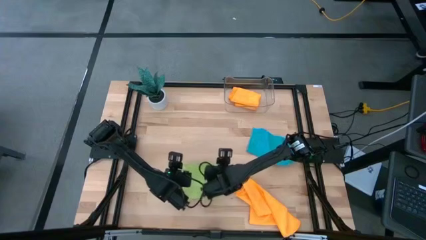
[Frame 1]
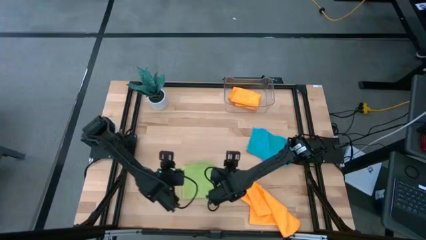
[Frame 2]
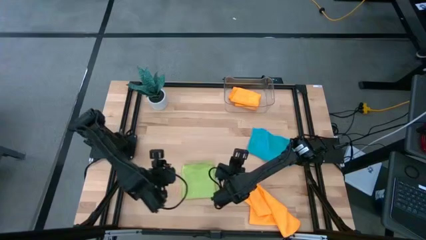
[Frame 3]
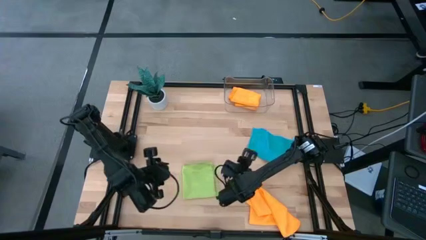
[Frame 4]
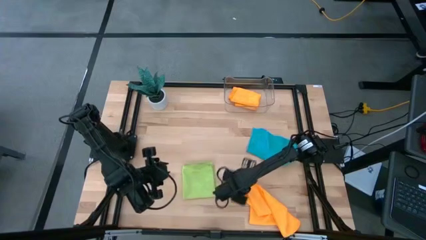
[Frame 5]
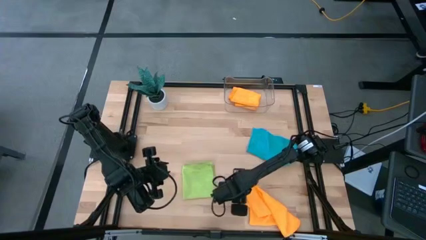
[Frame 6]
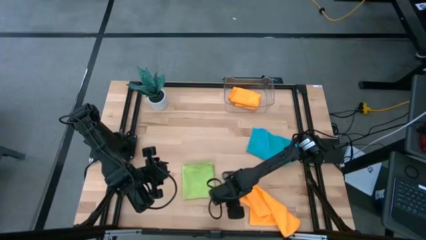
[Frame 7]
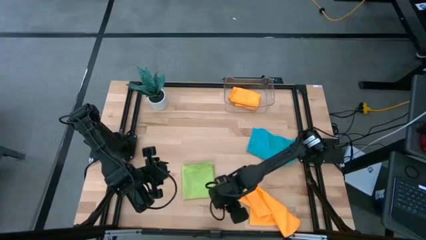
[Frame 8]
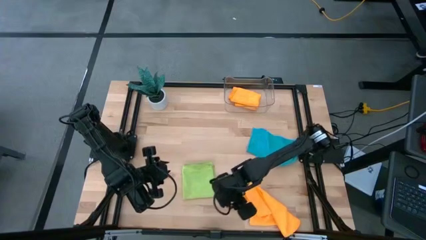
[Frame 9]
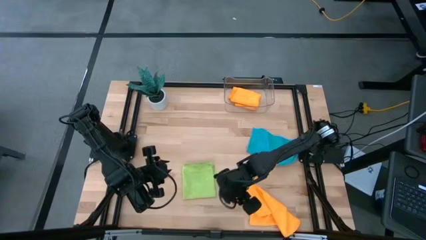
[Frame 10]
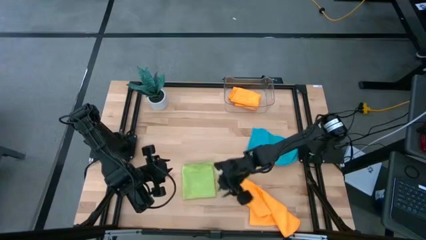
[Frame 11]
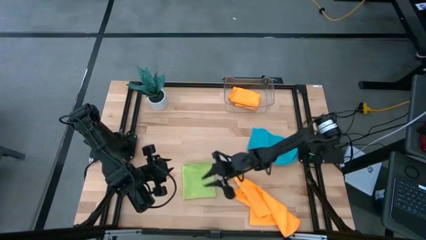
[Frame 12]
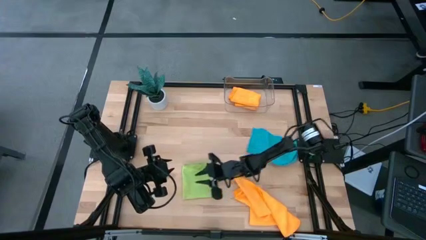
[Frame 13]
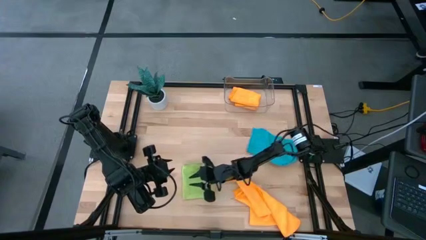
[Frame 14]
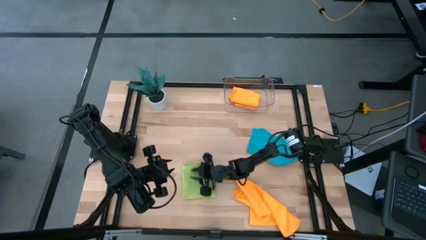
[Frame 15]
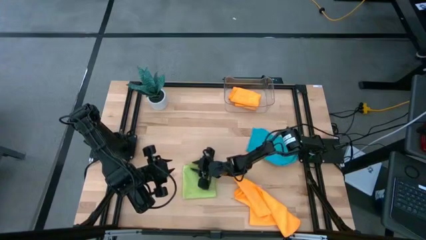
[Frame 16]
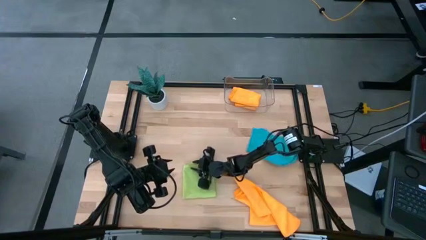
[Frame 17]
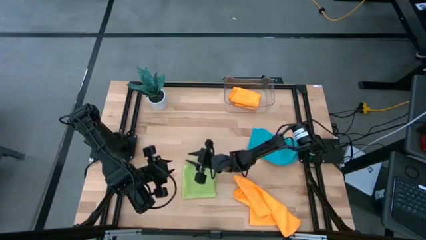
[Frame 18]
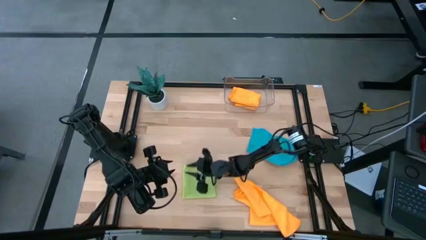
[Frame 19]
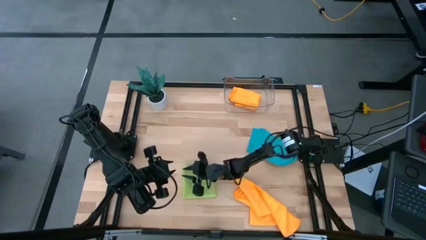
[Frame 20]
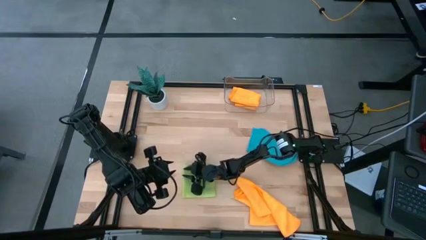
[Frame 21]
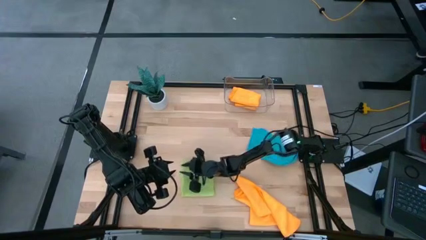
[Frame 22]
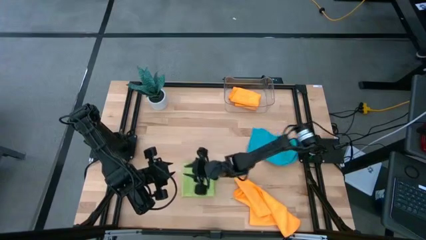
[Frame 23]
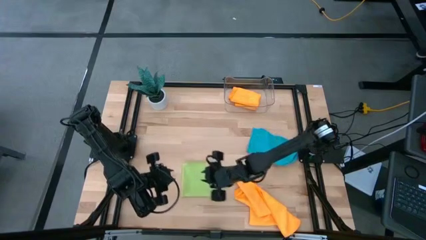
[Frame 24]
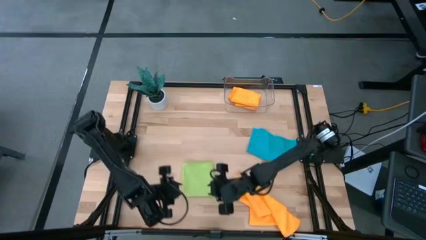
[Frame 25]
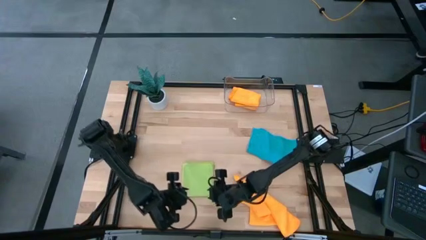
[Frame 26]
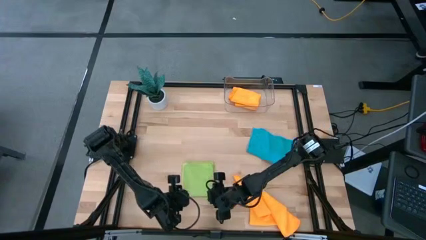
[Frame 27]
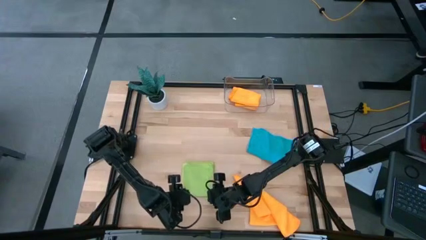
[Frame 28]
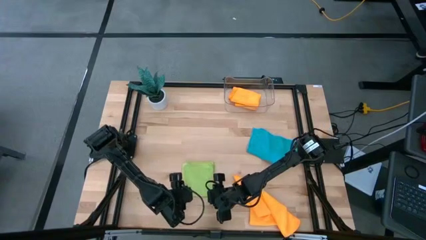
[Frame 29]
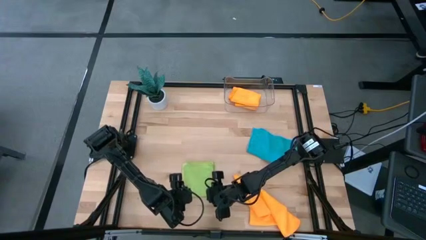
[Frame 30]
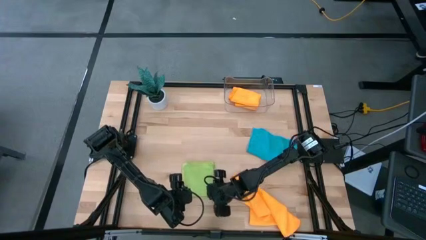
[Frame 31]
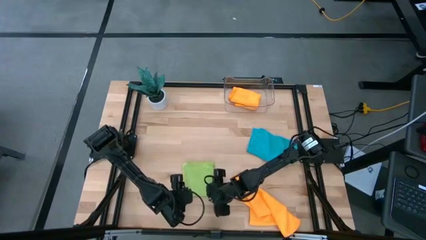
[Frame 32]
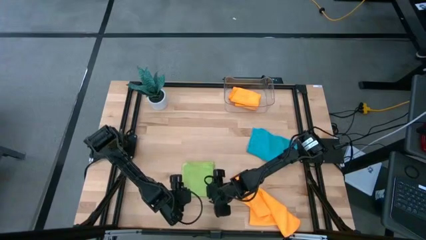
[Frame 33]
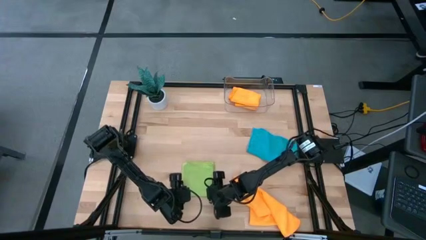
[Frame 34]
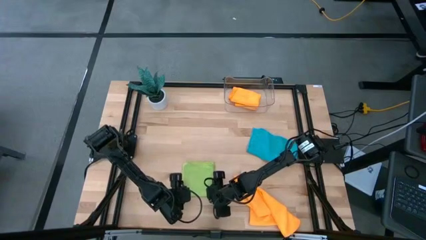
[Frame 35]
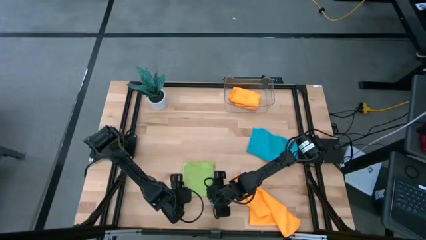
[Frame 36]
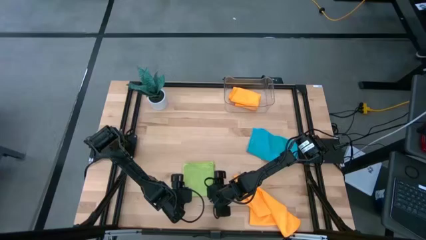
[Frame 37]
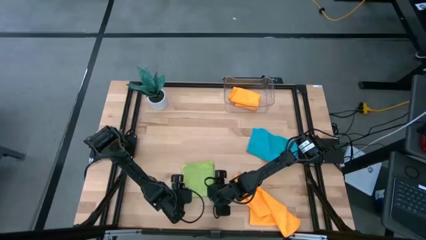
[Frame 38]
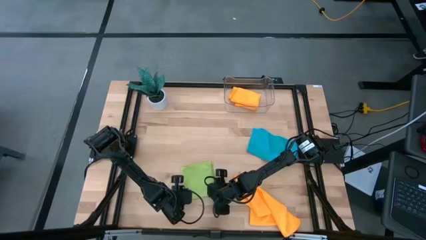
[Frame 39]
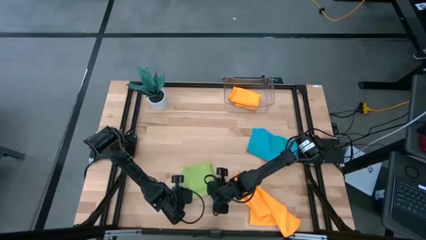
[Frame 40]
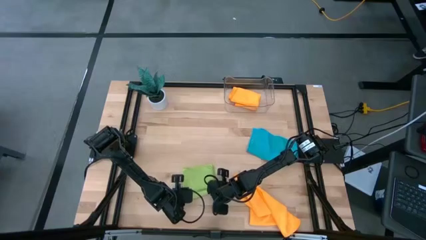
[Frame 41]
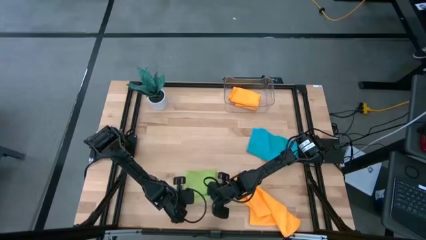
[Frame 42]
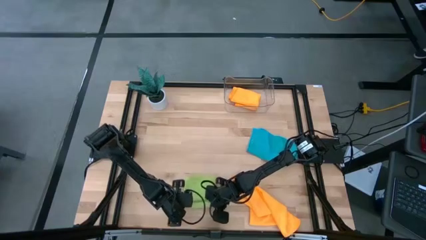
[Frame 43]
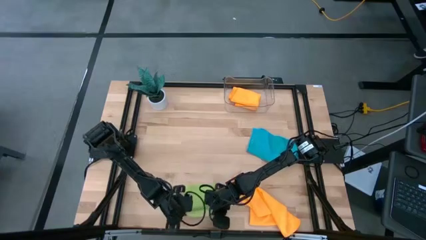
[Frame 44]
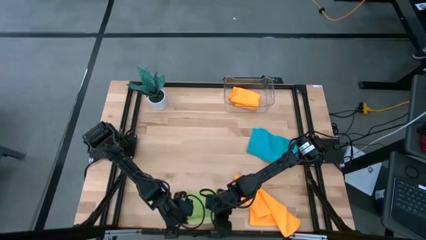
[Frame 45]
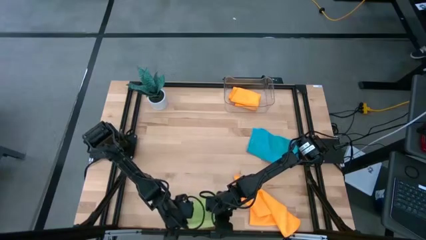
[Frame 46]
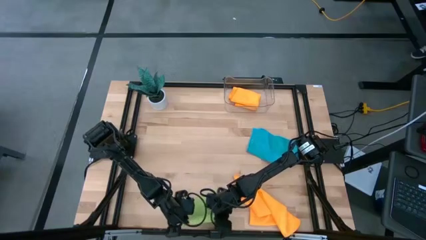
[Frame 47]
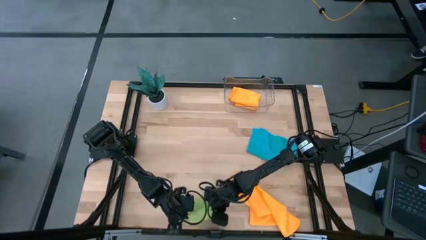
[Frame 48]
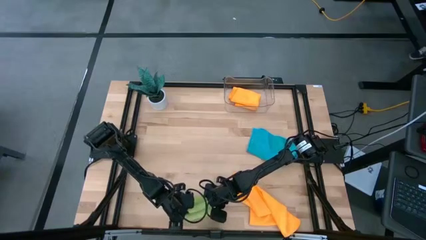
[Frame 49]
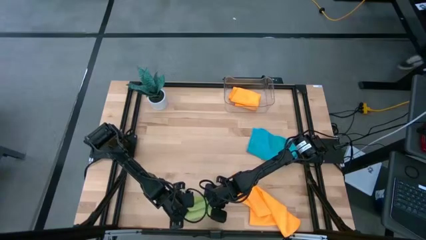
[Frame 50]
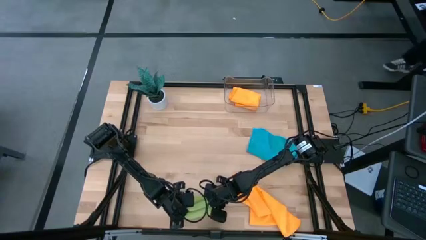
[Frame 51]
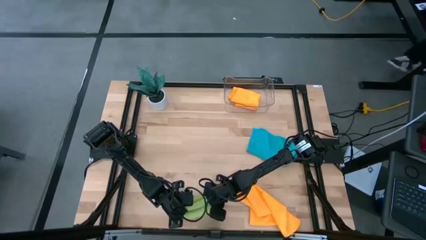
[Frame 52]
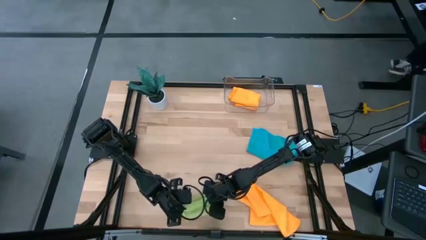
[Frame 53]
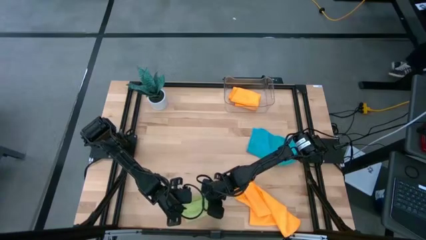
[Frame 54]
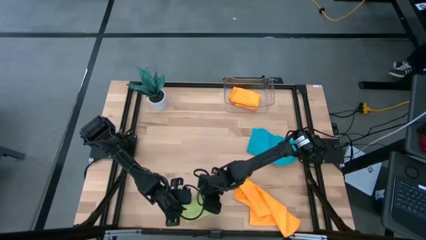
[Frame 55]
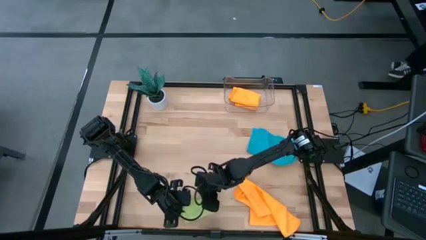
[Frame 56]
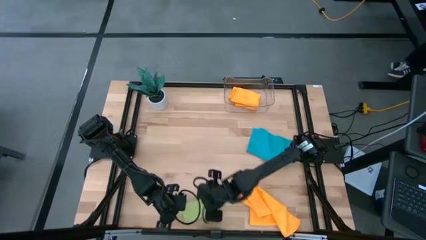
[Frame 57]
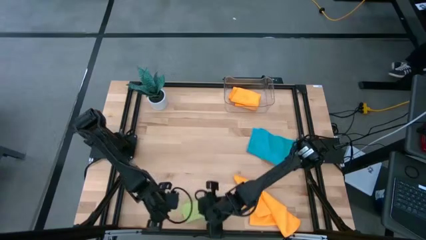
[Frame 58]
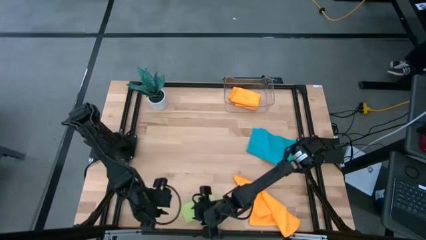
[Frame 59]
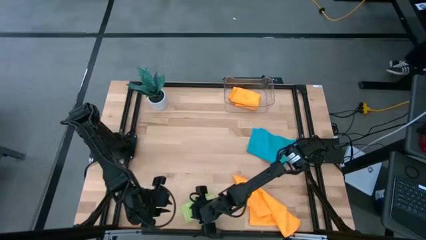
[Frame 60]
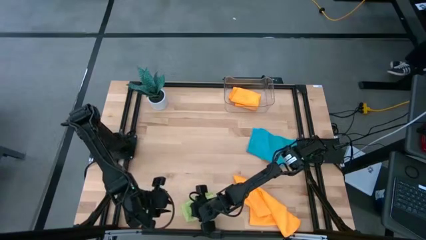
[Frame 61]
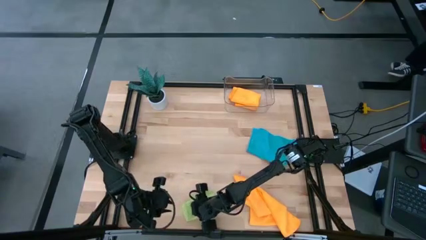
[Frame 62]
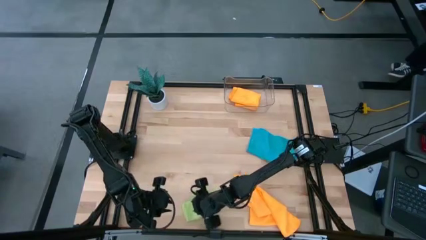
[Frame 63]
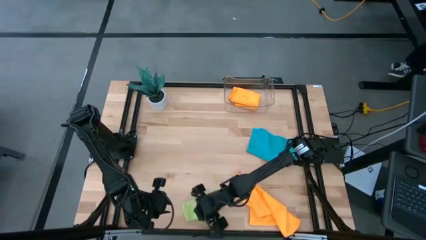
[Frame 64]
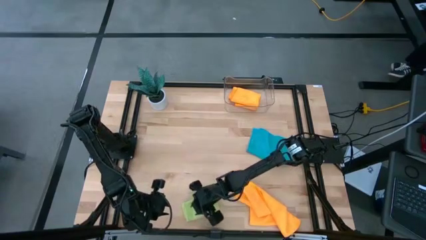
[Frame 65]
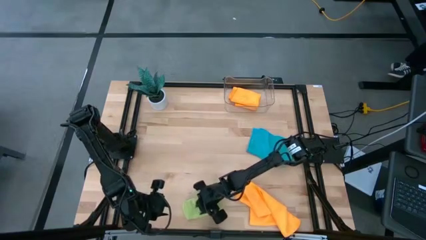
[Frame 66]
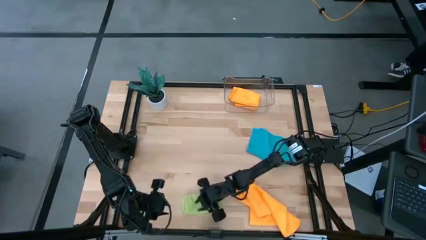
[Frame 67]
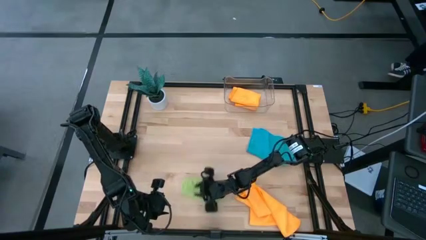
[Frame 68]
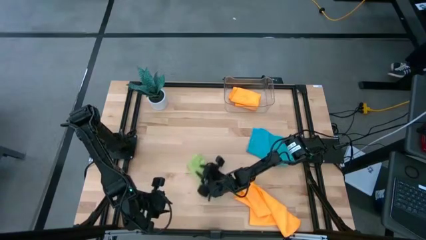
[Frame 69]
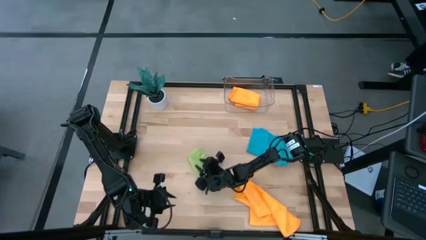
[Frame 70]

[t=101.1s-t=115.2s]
Task: Fold microfiber towels
Fold the green microfiber towel
